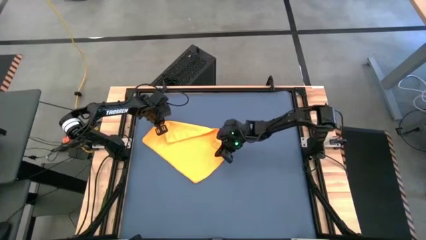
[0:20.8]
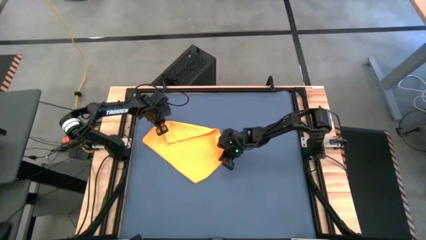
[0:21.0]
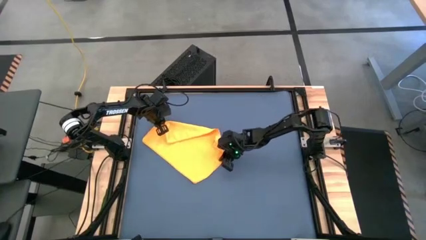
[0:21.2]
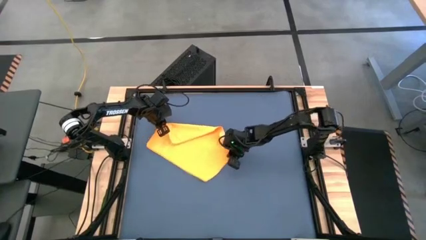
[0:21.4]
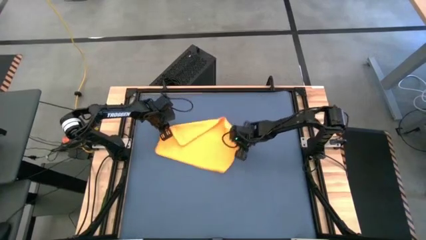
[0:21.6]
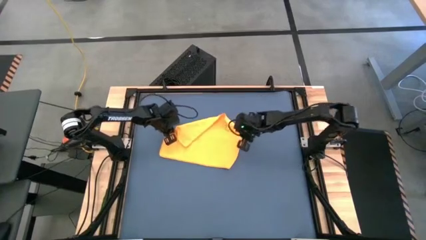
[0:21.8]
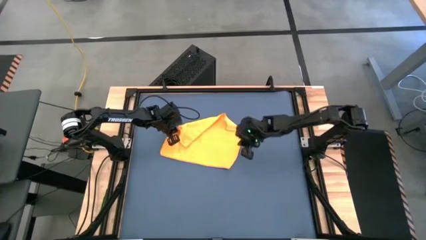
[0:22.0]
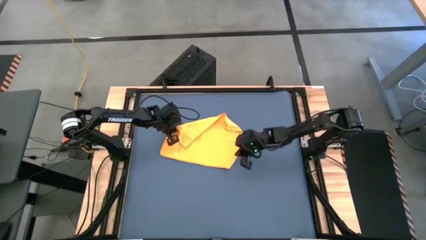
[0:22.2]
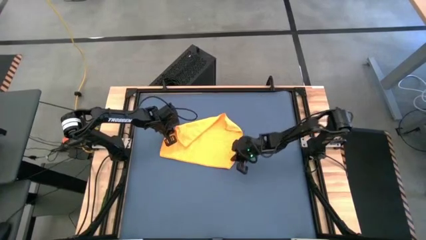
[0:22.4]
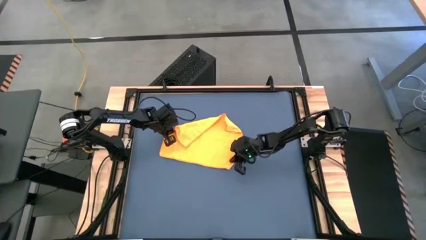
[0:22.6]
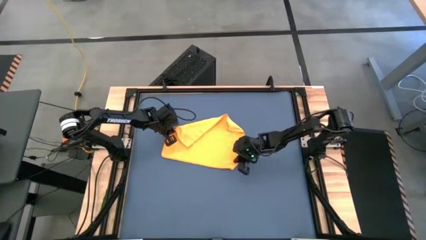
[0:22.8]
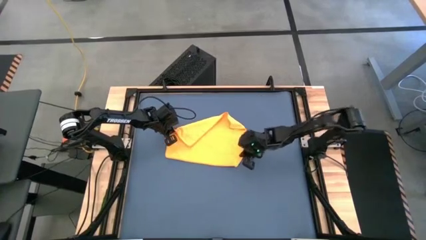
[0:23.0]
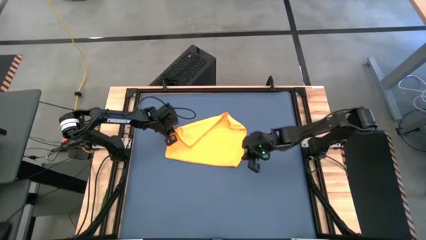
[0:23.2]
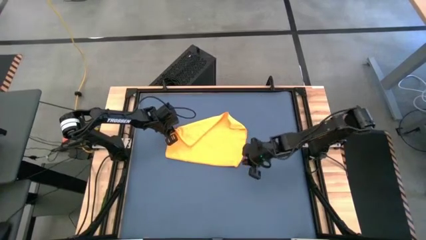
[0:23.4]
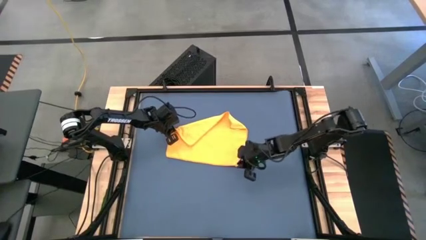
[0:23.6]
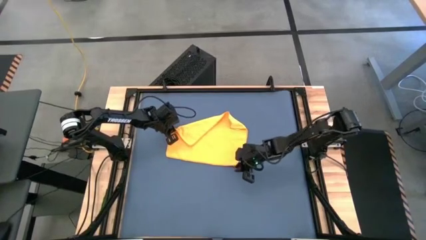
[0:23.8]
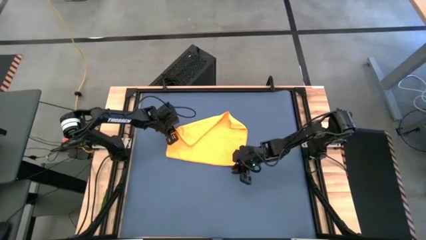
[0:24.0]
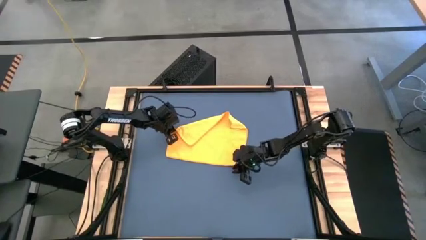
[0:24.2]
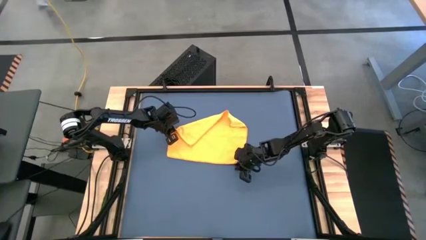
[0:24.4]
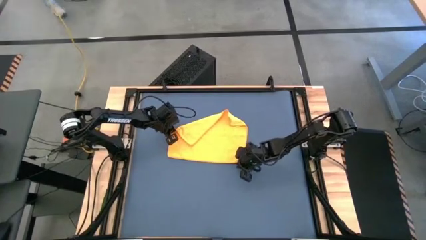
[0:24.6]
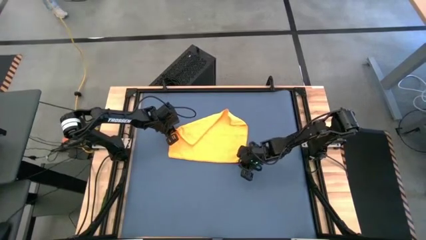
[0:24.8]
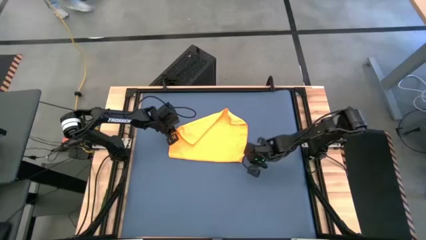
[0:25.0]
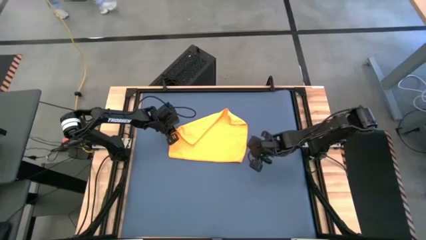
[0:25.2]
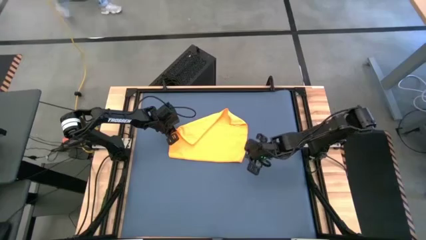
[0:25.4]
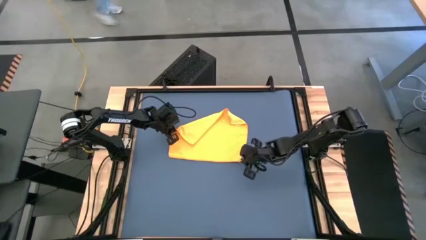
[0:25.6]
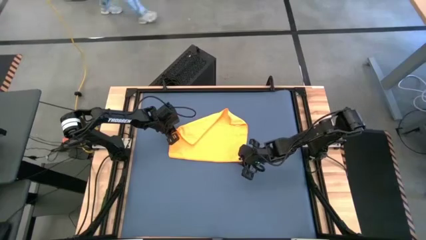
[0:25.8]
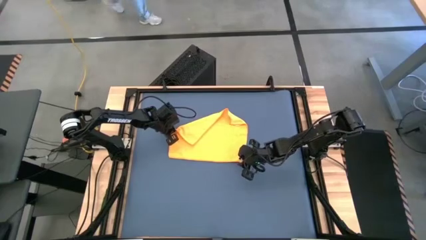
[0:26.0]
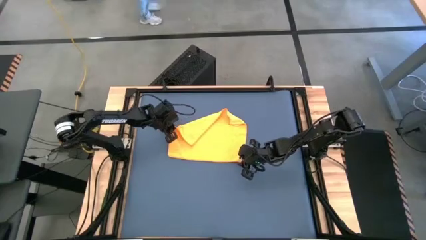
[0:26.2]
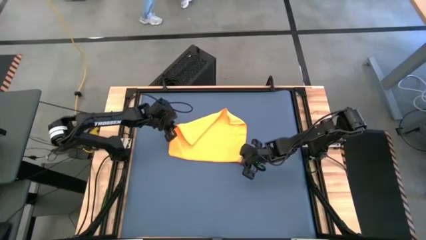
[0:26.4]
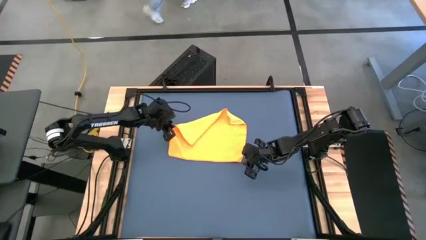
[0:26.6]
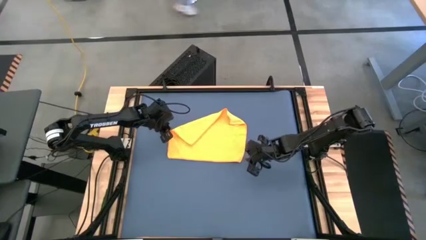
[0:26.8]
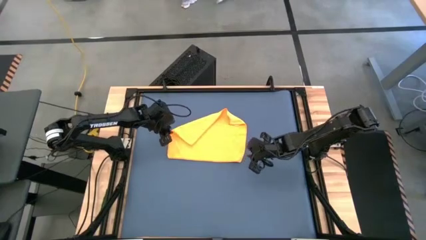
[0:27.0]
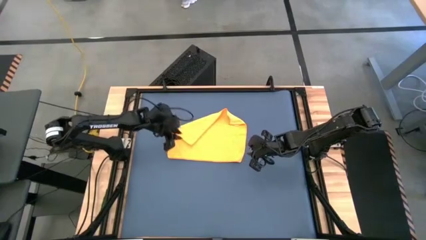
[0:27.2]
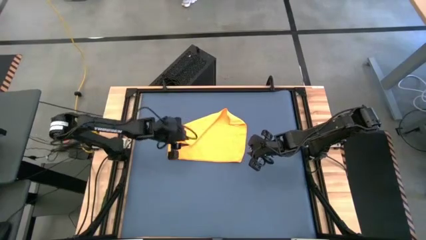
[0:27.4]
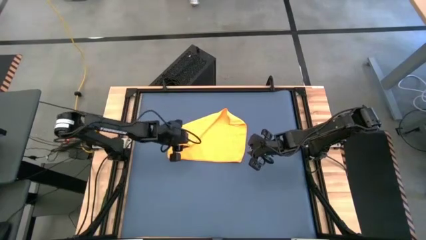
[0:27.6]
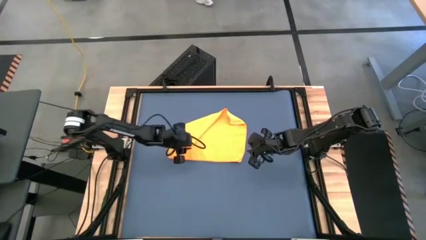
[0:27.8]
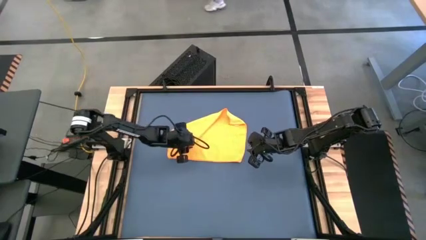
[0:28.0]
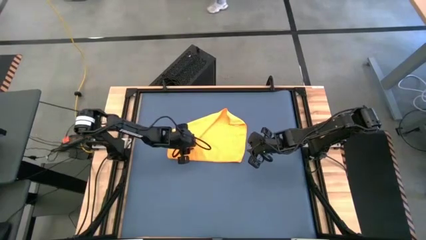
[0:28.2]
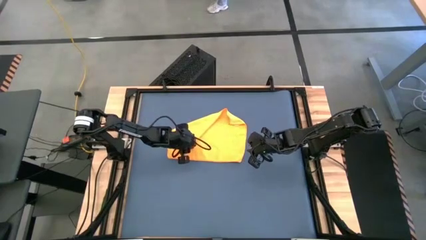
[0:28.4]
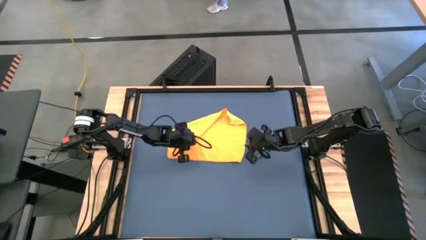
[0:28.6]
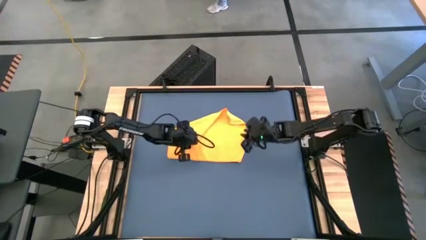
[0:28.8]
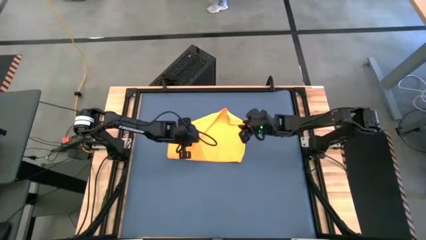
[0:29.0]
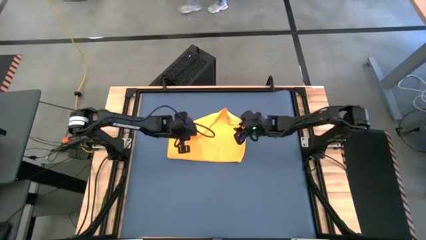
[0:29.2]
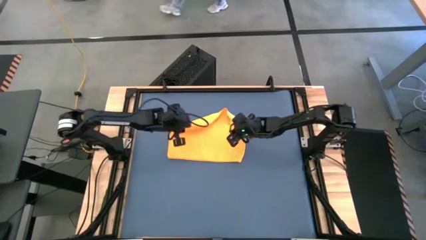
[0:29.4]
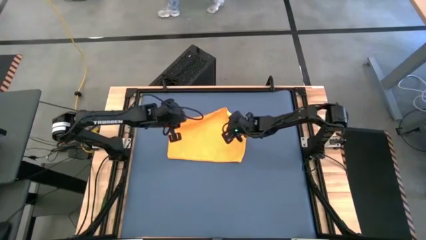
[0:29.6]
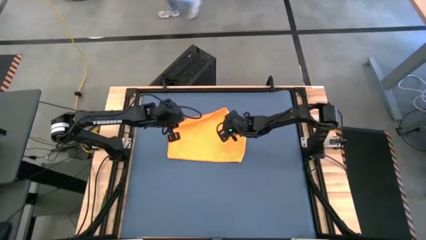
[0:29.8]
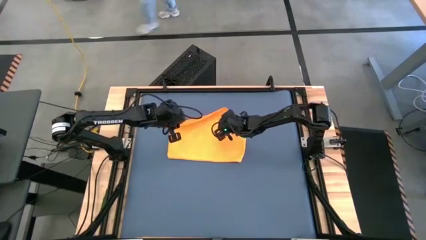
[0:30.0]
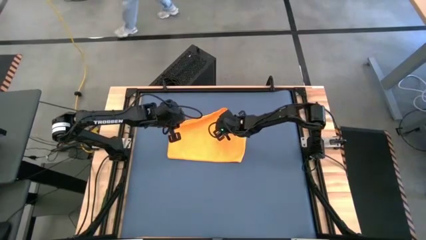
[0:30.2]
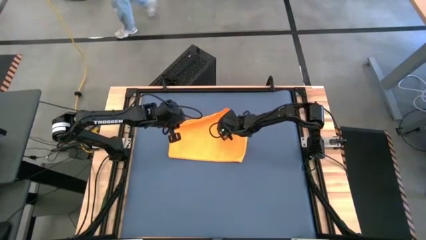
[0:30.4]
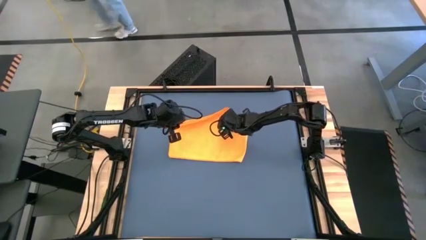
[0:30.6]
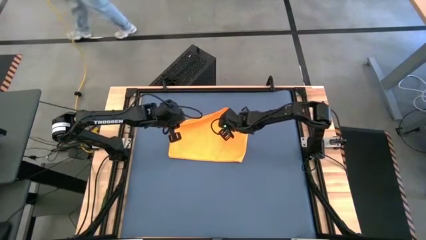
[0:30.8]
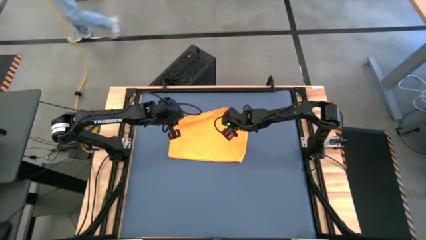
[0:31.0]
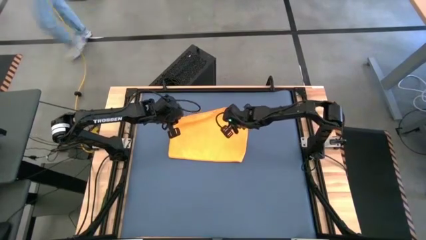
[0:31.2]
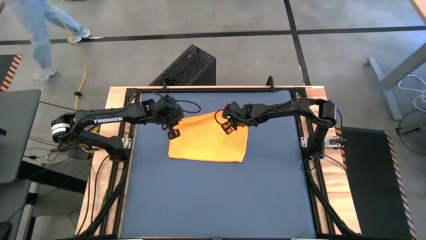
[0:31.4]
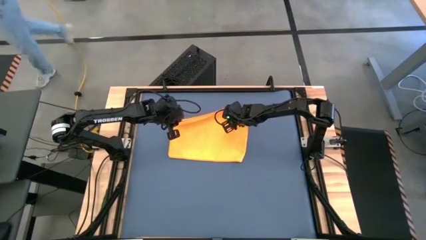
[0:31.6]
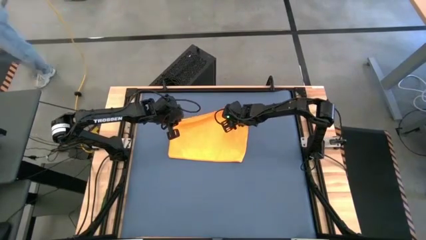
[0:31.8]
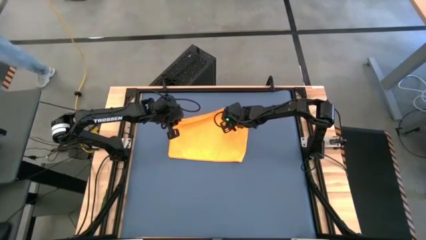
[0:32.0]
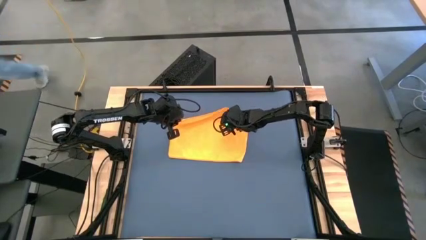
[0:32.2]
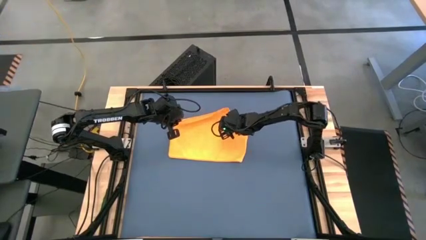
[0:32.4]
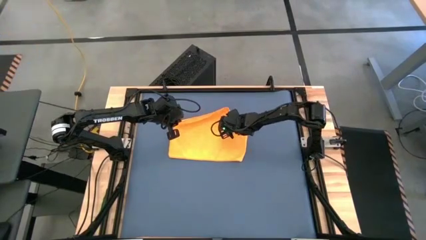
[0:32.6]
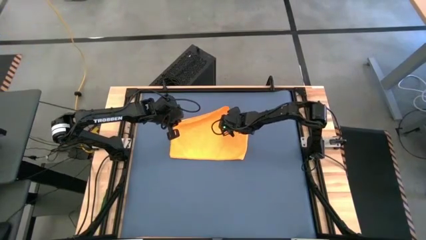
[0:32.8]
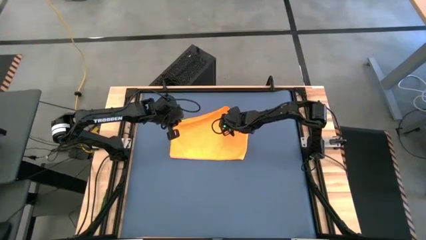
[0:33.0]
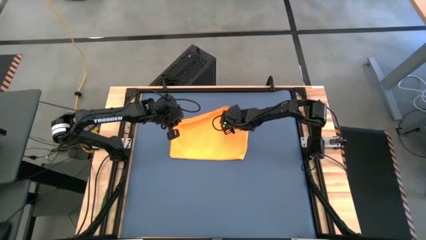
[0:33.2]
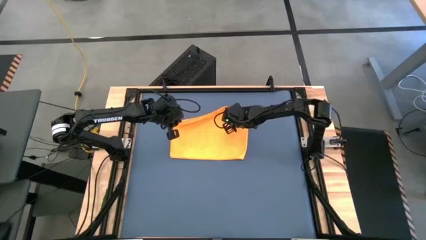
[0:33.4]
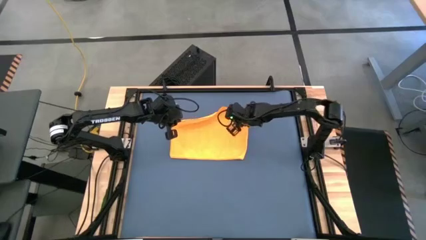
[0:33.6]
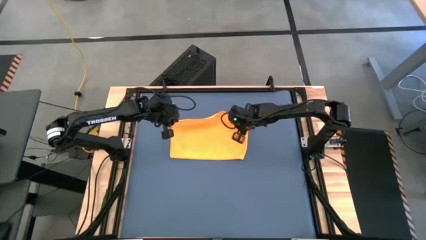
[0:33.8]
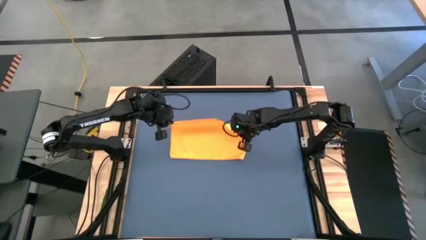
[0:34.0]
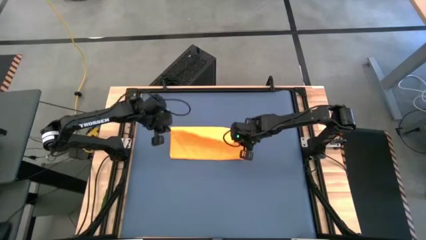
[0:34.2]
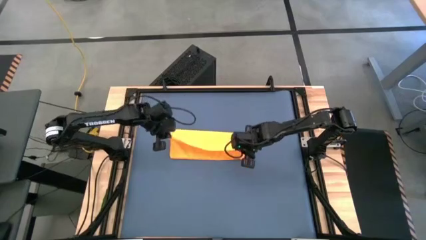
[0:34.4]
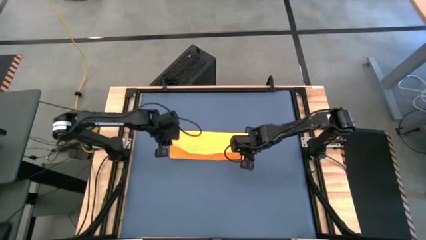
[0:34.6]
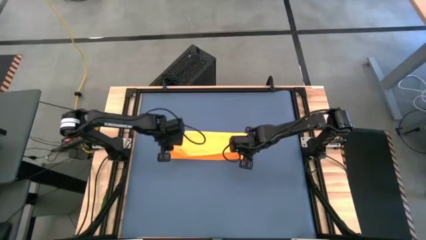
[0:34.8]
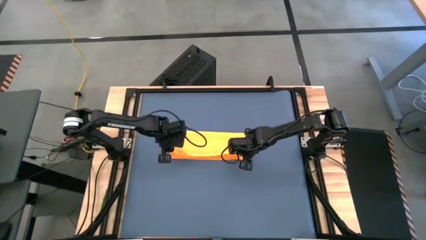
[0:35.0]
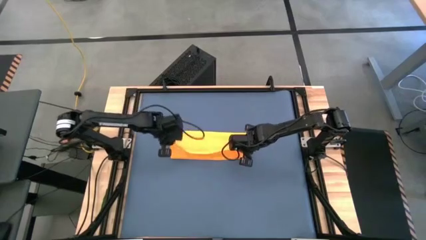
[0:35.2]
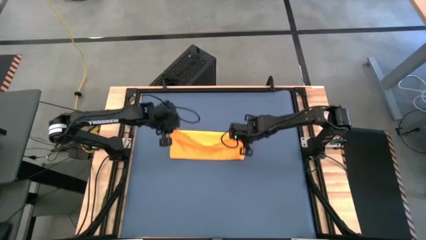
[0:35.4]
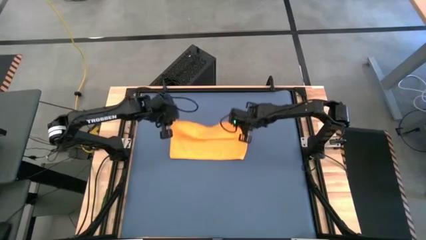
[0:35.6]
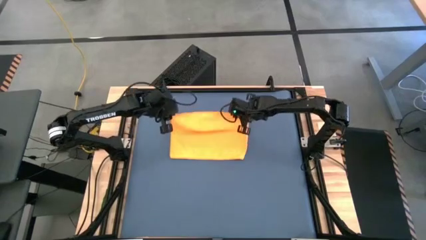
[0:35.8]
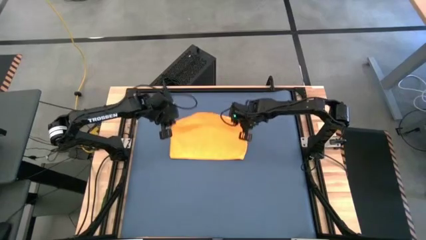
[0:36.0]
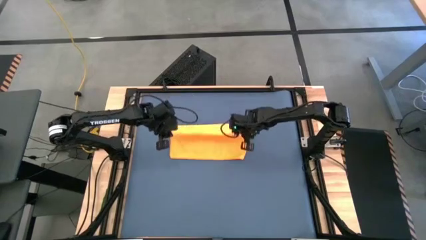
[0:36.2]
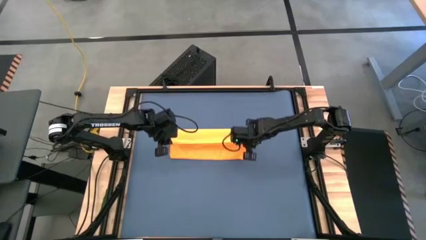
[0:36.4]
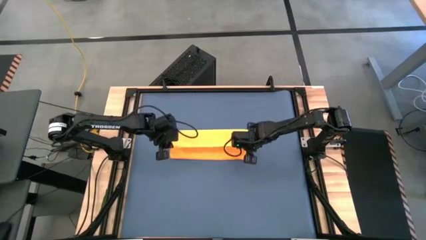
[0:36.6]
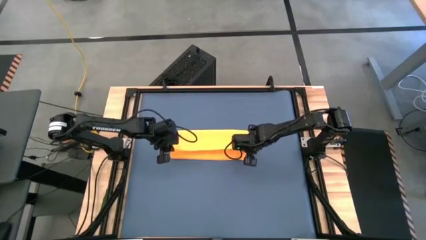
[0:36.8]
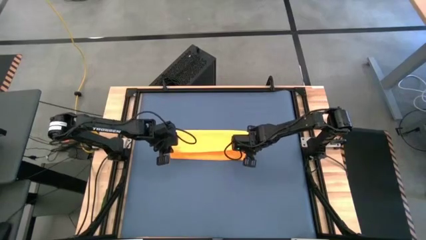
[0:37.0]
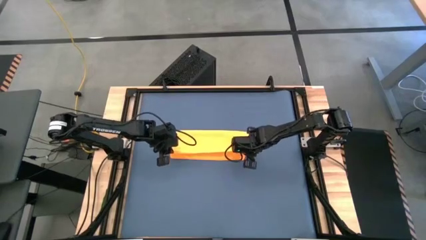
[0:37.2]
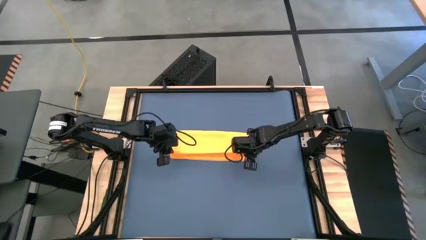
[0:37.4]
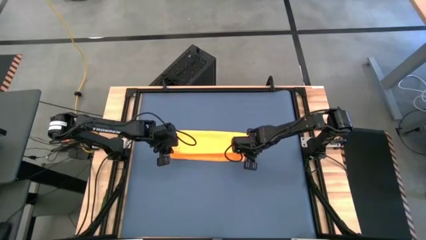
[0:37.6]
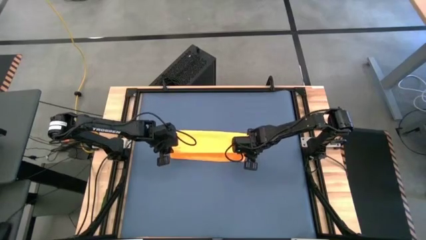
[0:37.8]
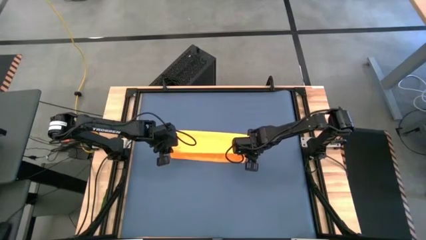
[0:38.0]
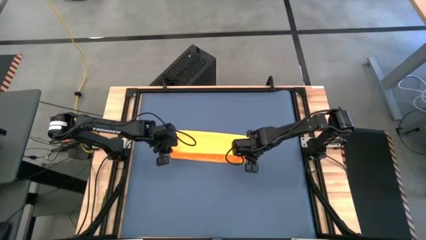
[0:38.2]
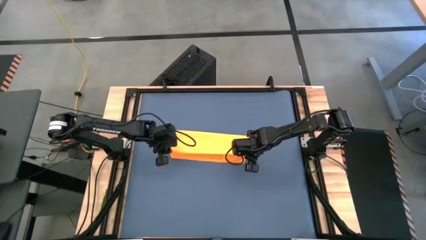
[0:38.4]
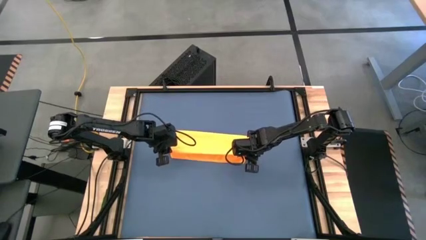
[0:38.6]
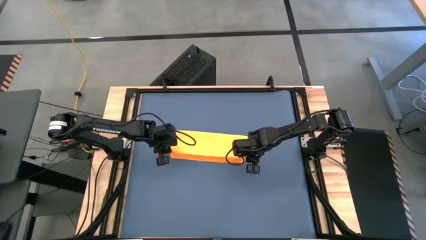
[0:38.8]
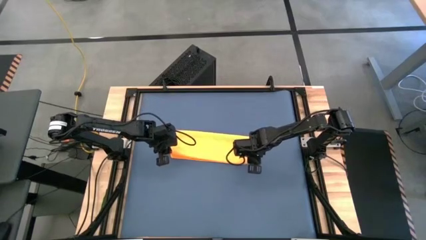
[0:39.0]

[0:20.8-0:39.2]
Task: Roll towel
Fold the yellow microfiber towel
